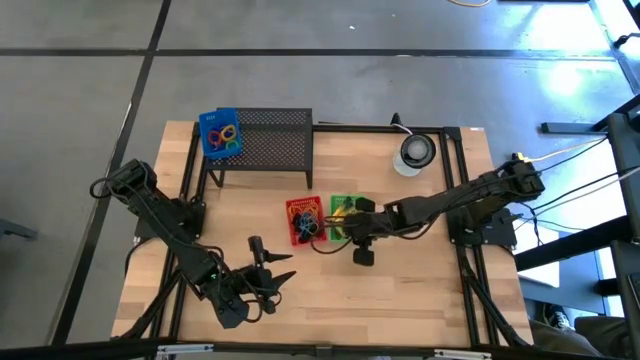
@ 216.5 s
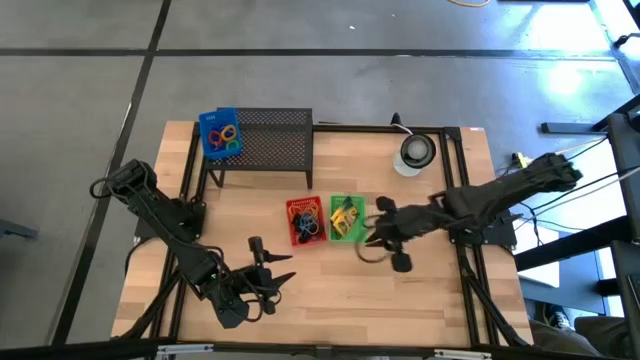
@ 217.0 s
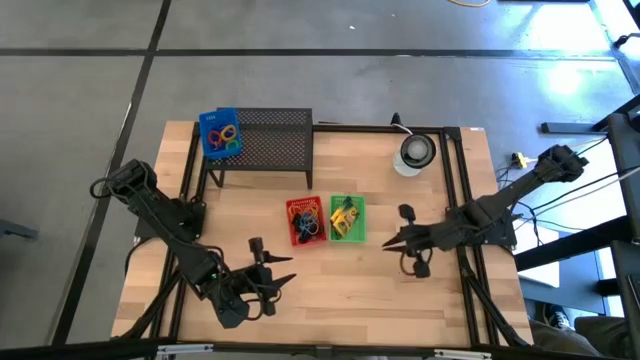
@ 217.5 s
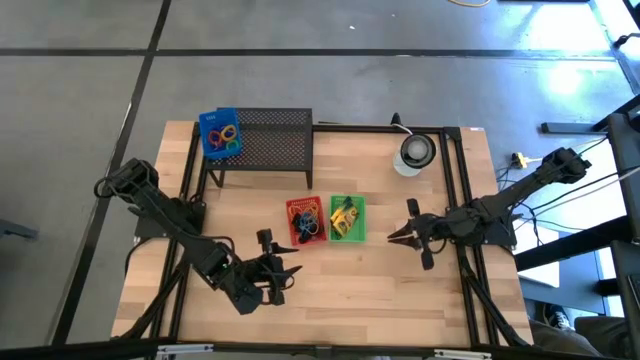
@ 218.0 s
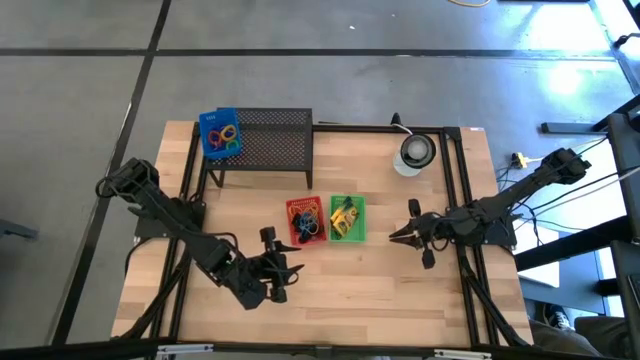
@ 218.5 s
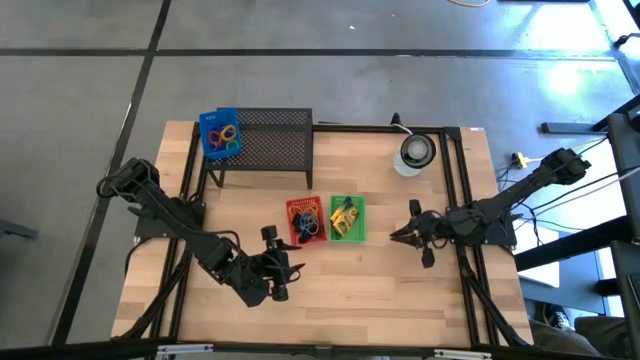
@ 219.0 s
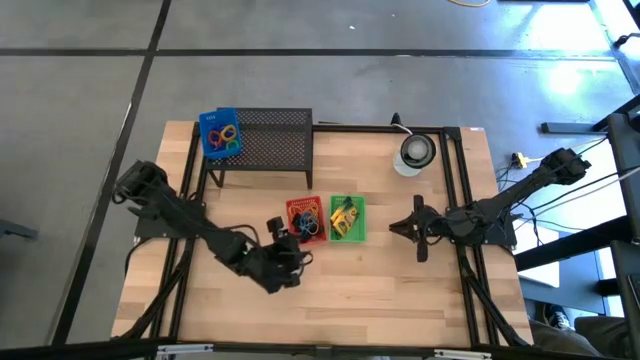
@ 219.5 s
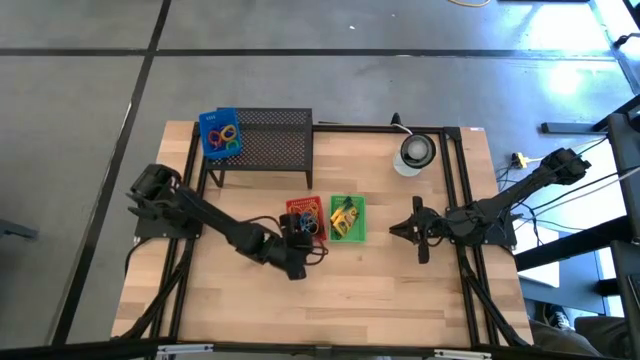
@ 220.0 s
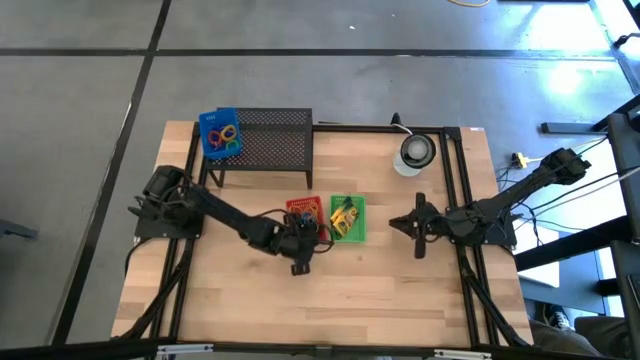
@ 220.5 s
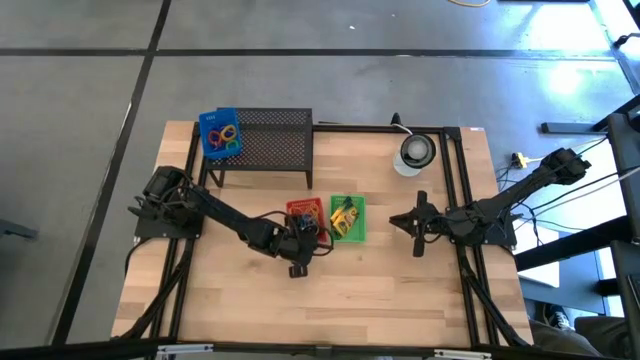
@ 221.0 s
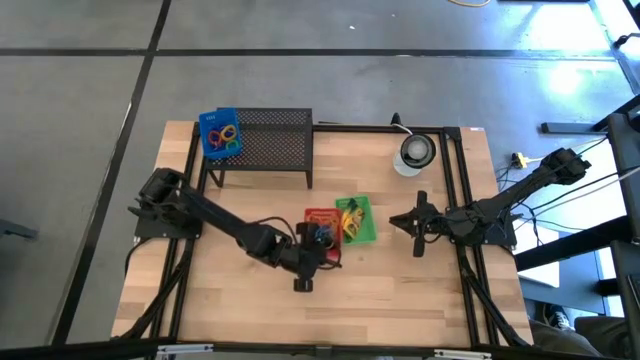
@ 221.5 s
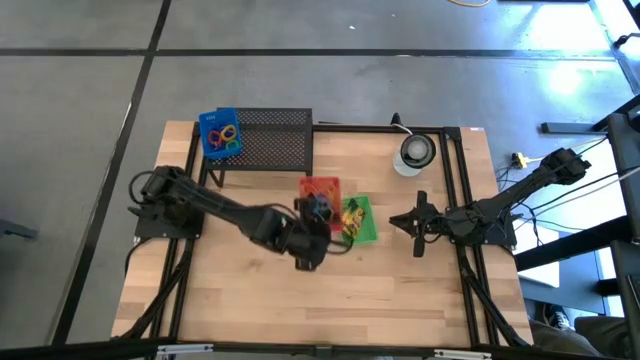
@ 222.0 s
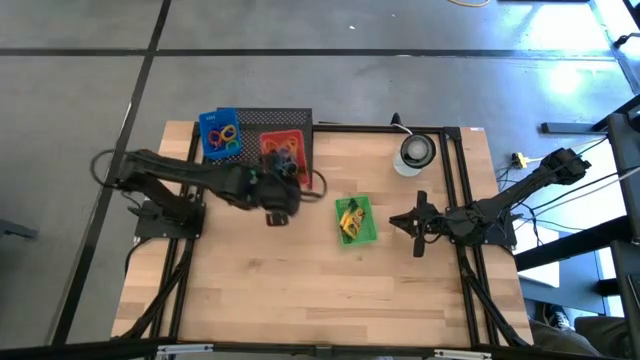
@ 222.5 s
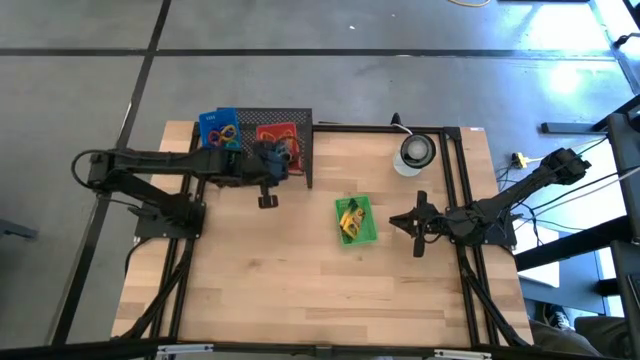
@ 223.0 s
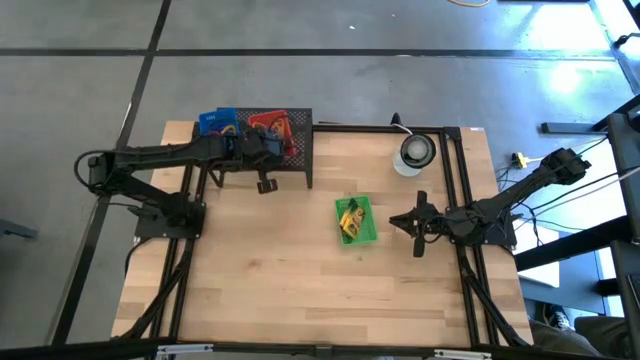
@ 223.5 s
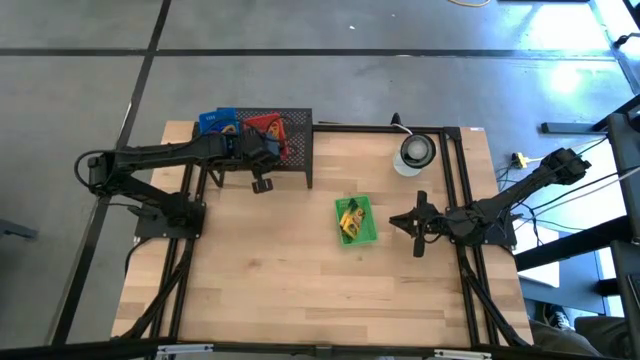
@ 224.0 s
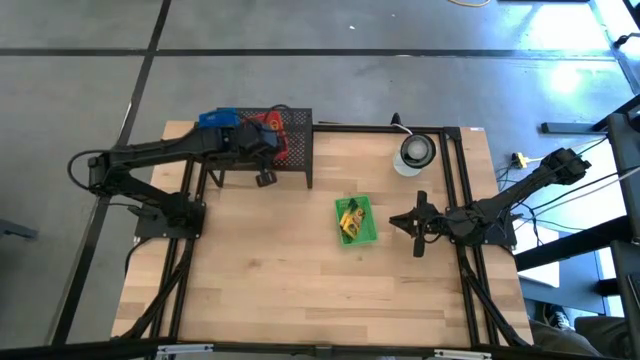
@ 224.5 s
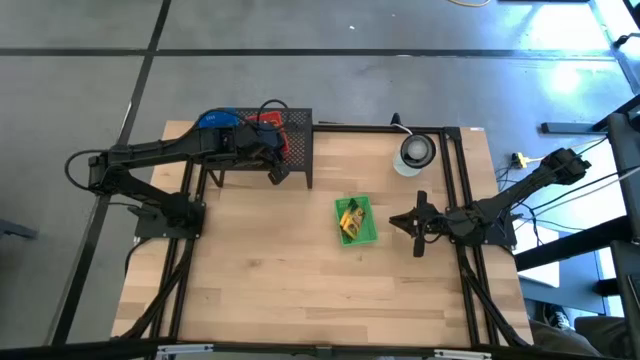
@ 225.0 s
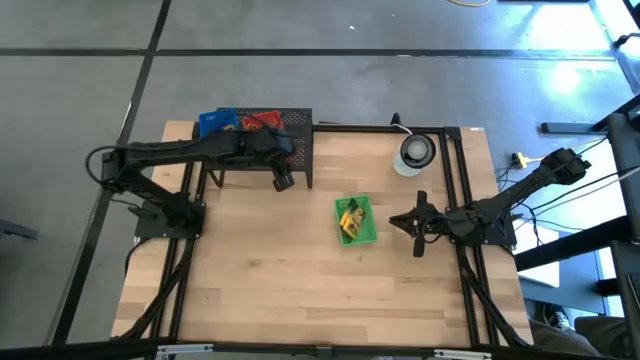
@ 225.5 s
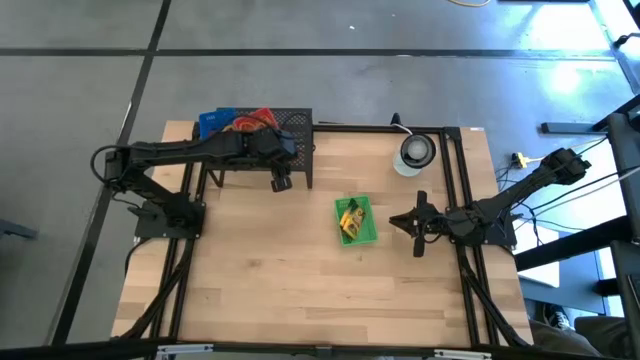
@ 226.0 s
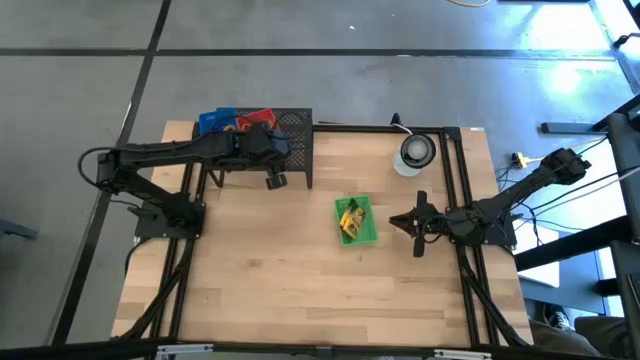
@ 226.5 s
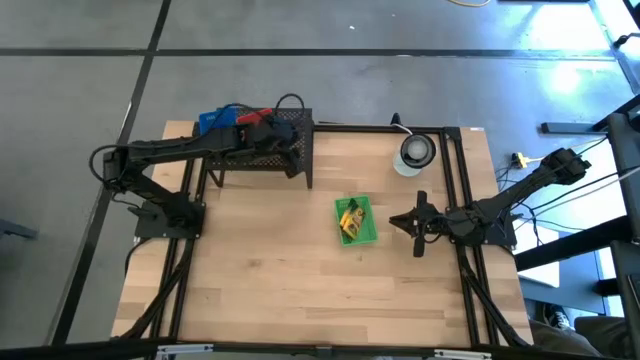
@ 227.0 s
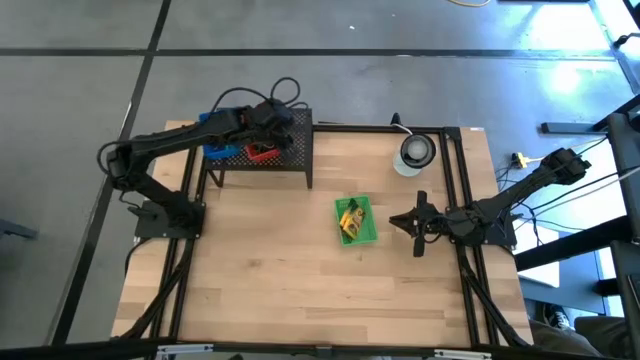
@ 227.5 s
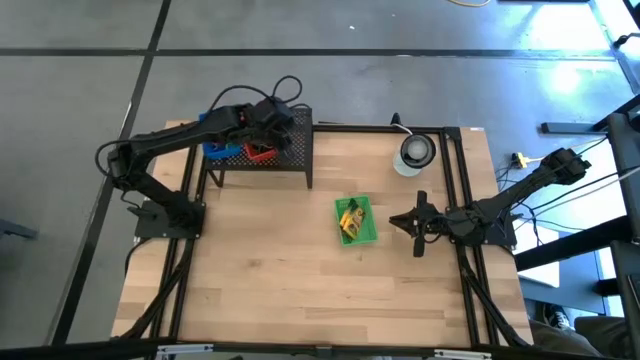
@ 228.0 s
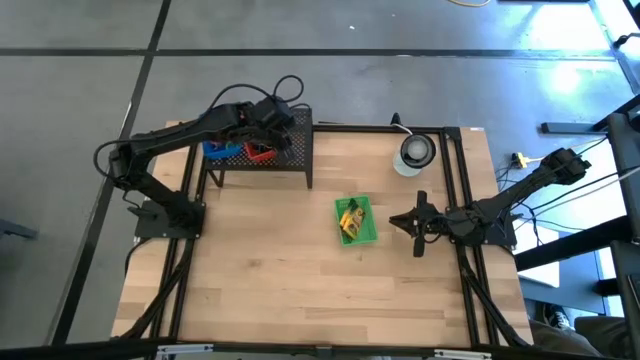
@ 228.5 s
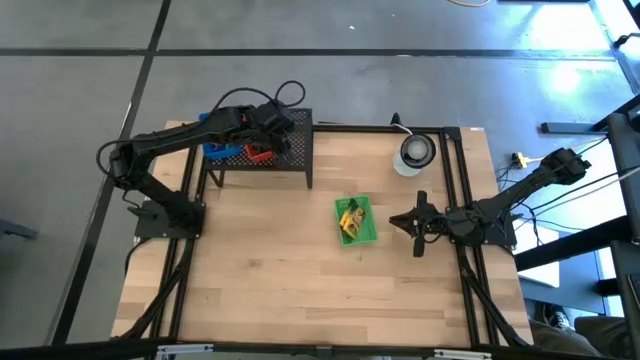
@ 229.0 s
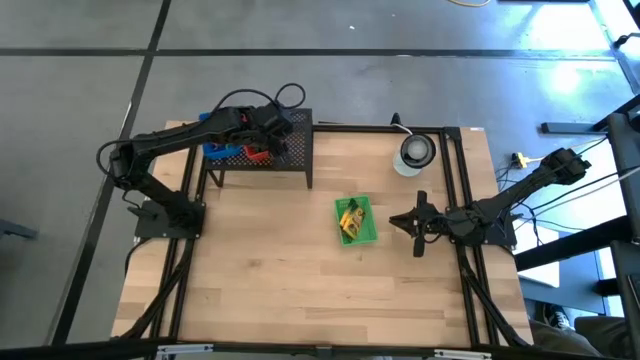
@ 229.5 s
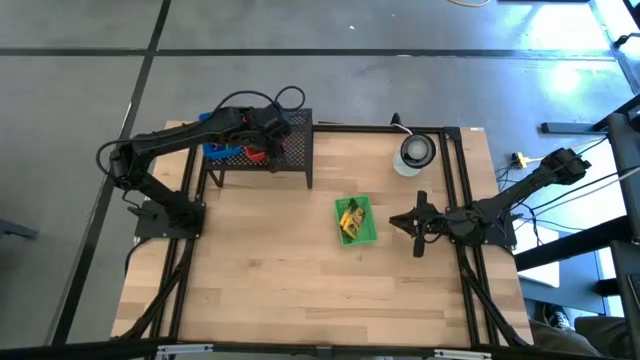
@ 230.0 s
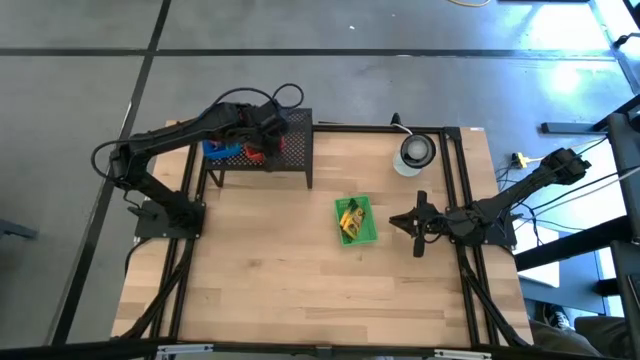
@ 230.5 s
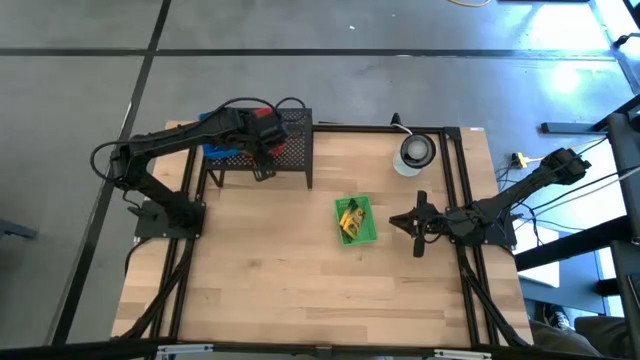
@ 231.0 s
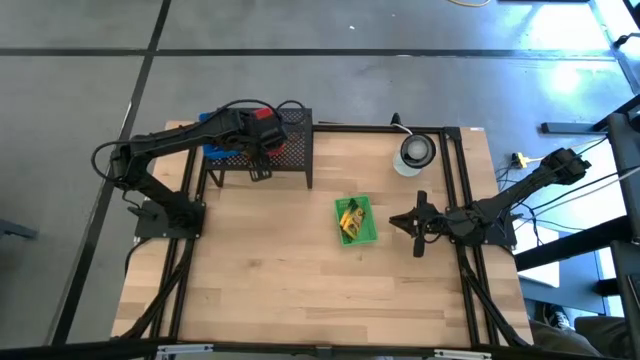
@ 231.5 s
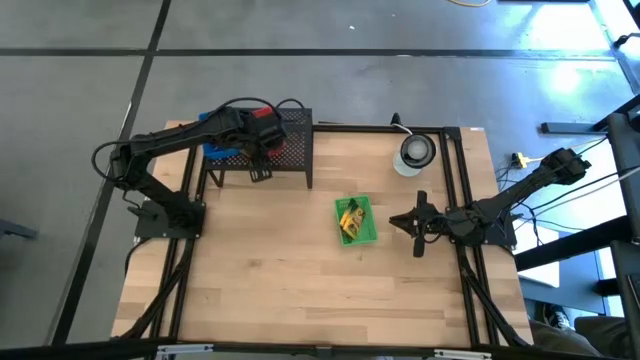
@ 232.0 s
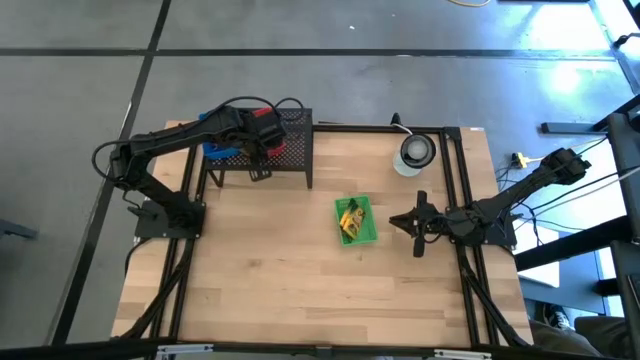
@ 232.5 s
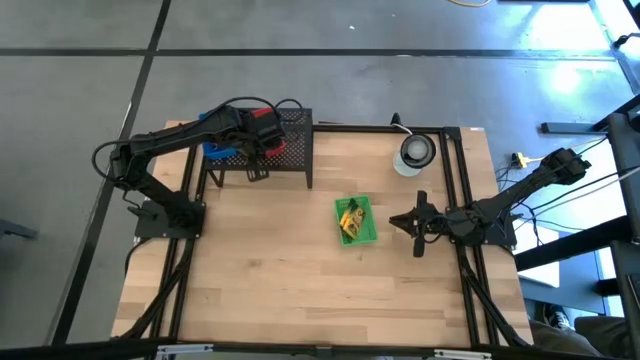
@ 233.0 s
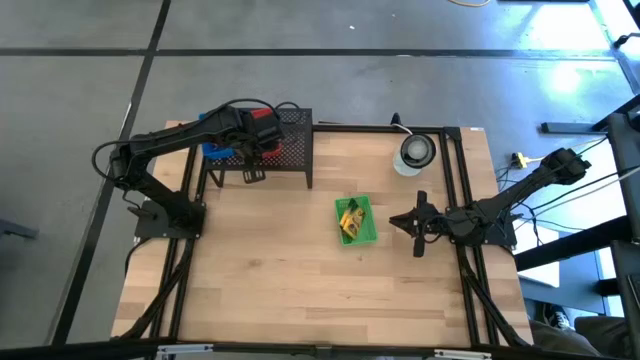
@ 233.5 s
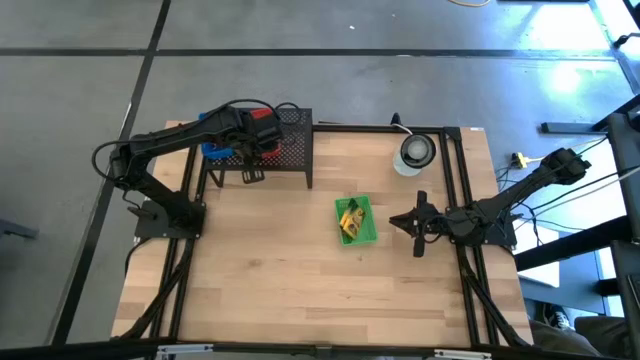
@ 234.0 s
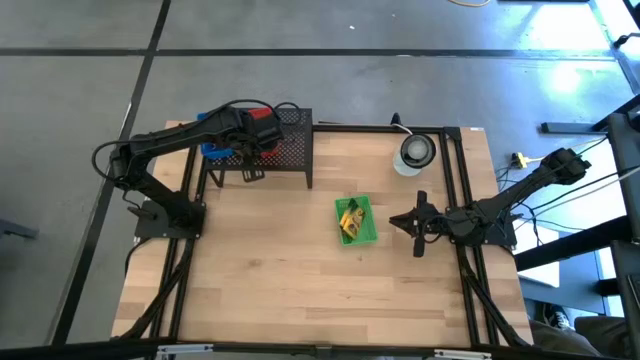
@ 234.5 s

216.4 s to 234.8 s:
Task: Pick & Place Office Desk Supplies
Put the red bin with rubber bands on the shelf

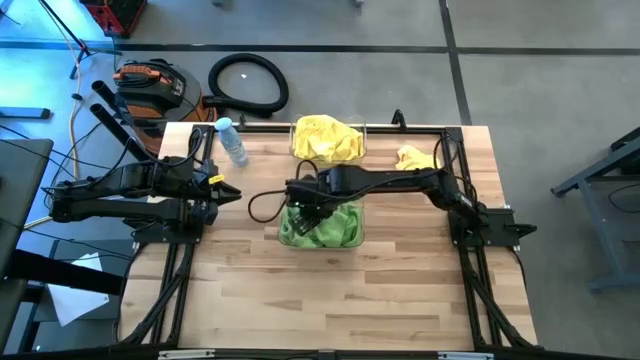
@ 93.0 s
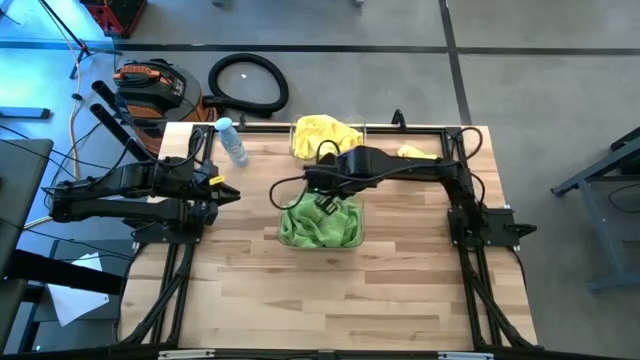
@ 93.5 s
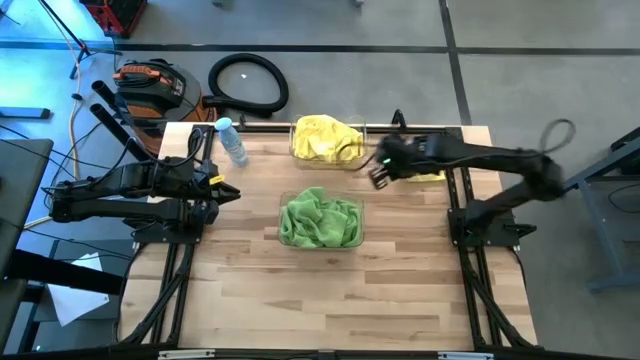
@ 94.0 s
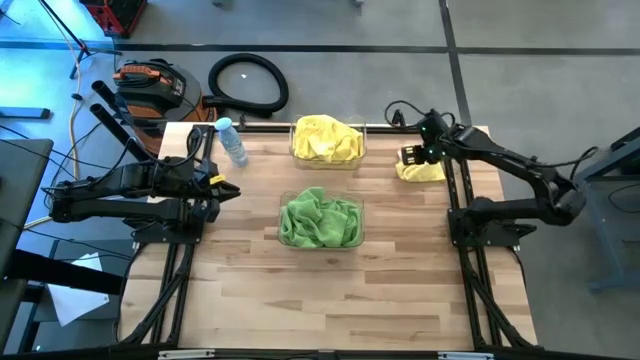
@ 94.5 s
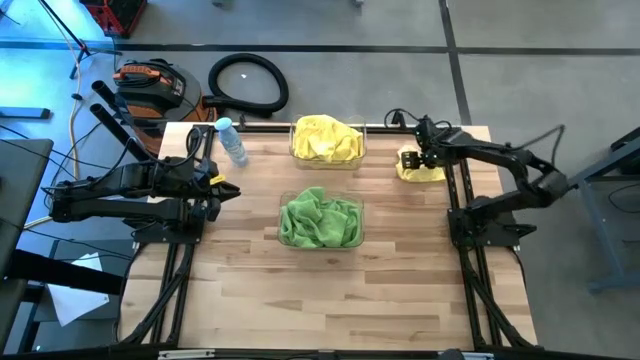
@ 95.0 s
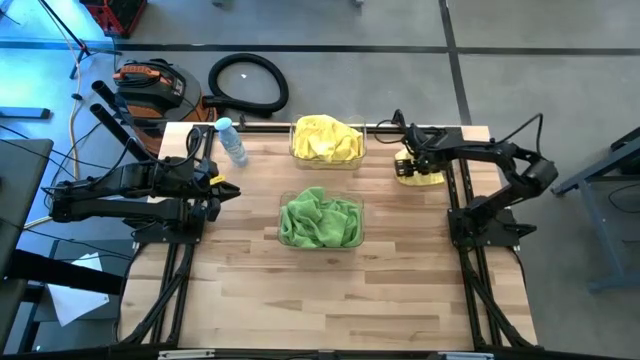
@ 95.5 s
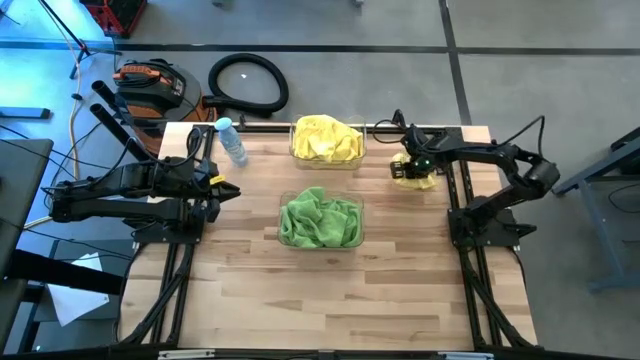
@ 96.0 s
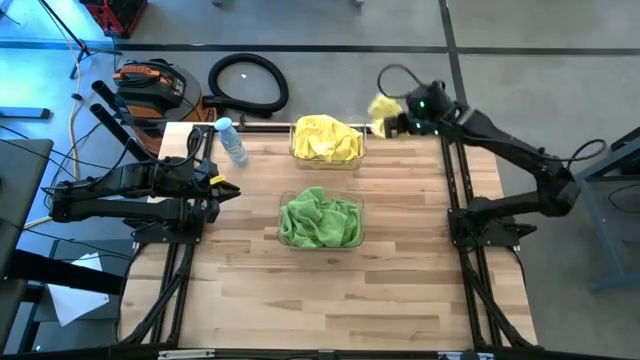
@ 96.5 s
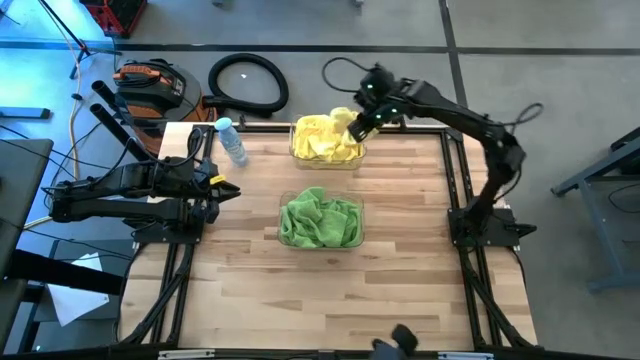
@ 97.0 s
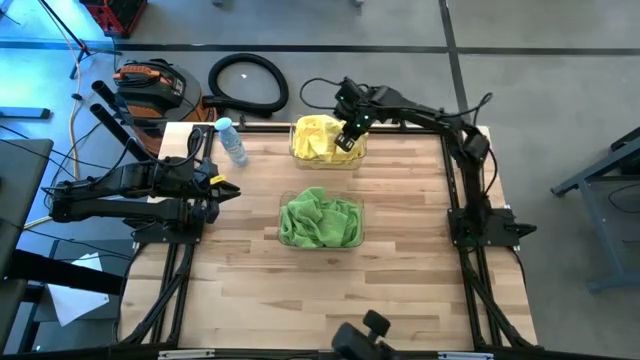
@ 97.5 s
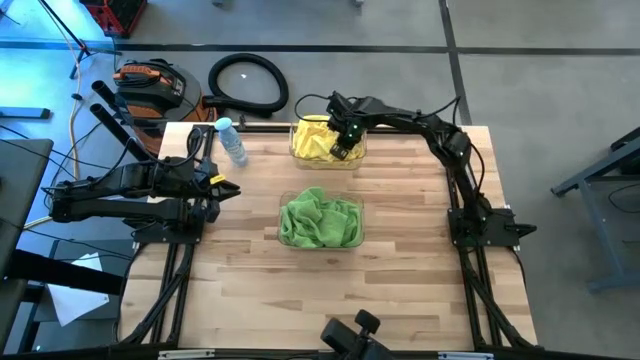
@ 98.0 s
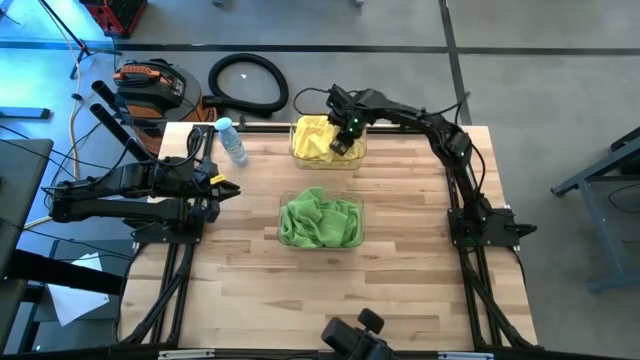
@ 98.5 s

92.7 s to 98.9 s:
Task: Sort microfiber towel by color & place in baskets
Put the yellow towel into the top transparent bin
